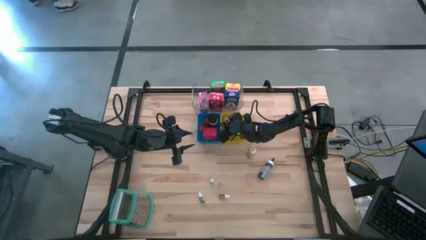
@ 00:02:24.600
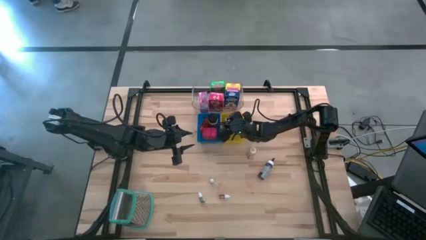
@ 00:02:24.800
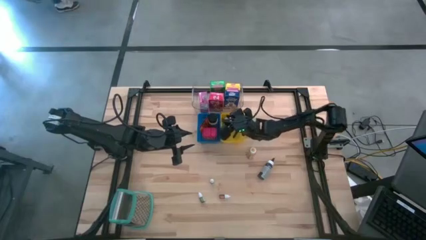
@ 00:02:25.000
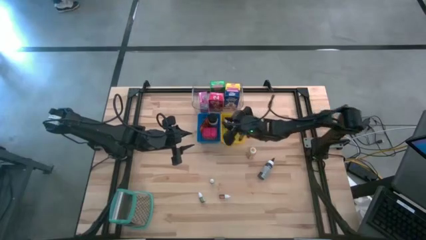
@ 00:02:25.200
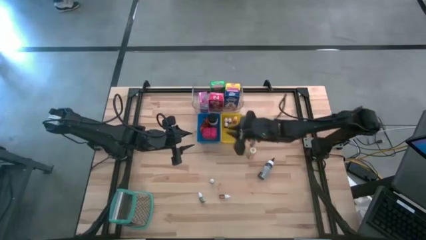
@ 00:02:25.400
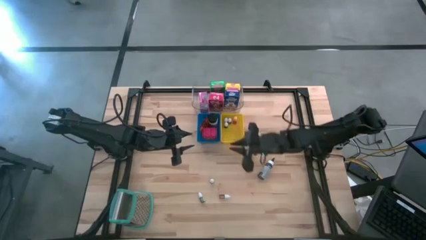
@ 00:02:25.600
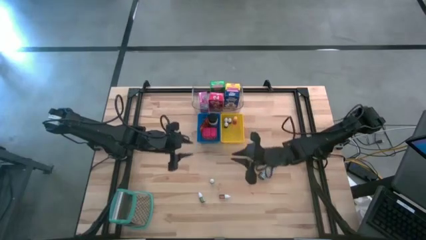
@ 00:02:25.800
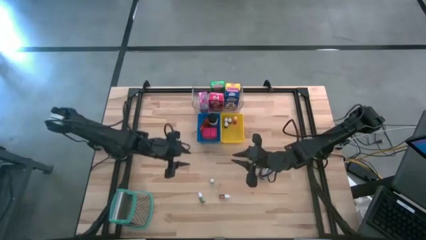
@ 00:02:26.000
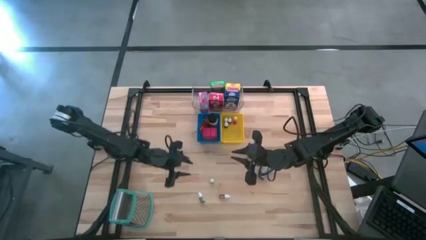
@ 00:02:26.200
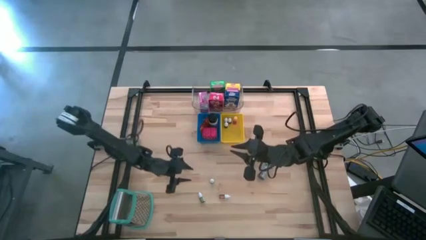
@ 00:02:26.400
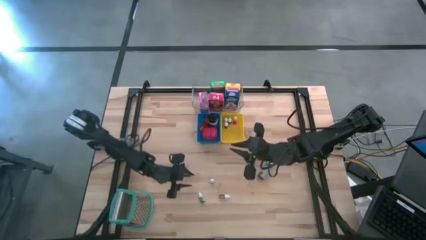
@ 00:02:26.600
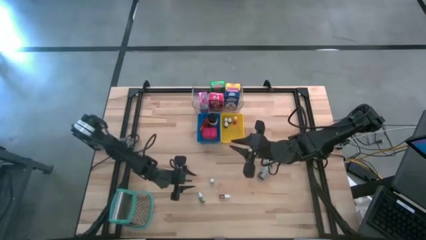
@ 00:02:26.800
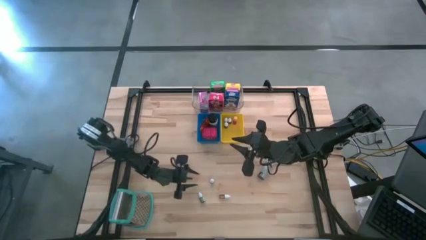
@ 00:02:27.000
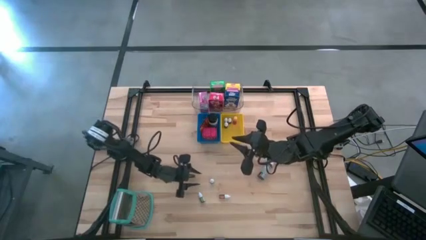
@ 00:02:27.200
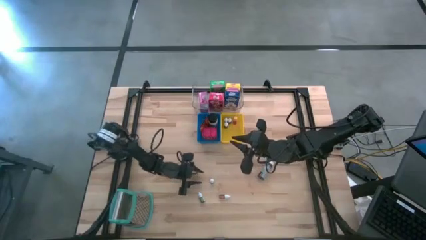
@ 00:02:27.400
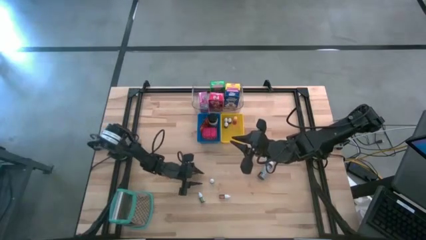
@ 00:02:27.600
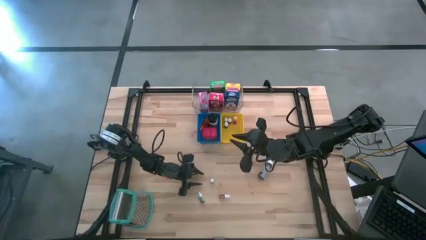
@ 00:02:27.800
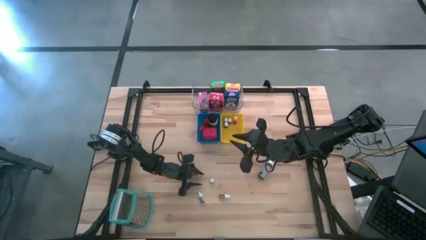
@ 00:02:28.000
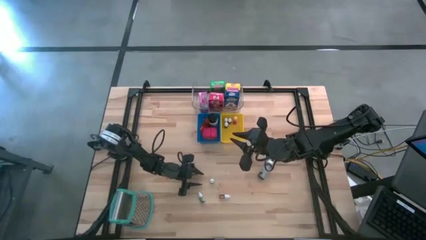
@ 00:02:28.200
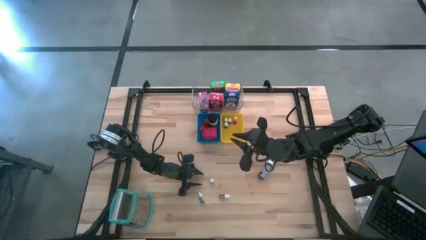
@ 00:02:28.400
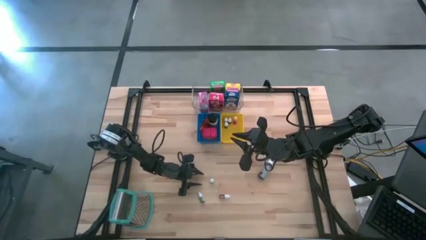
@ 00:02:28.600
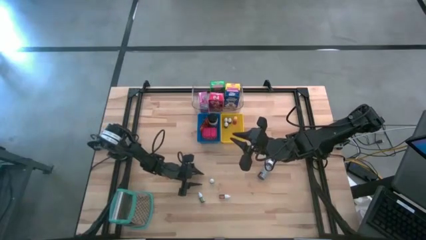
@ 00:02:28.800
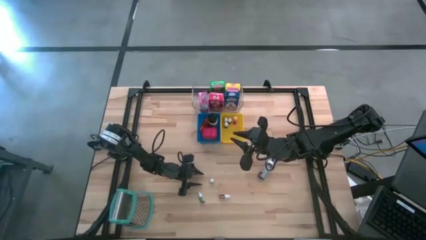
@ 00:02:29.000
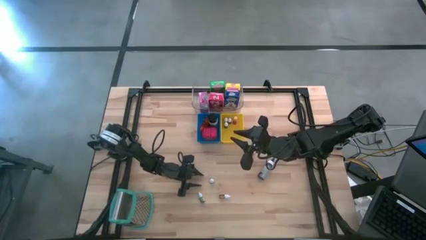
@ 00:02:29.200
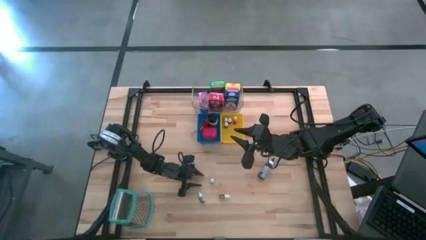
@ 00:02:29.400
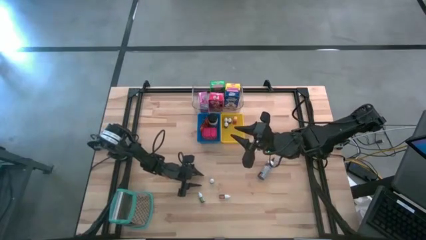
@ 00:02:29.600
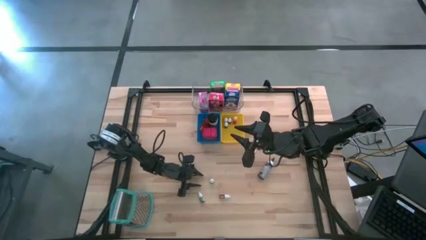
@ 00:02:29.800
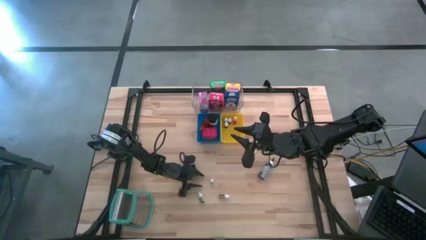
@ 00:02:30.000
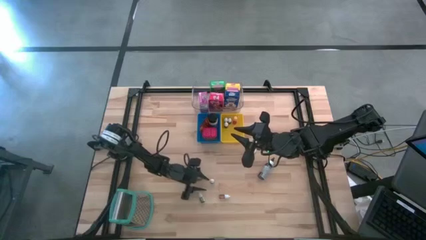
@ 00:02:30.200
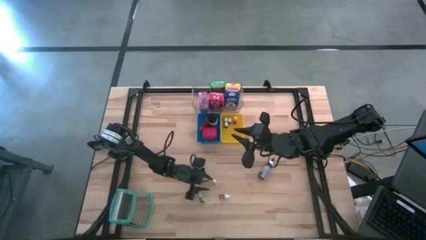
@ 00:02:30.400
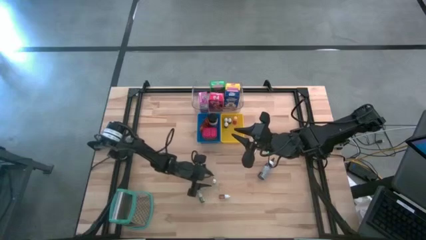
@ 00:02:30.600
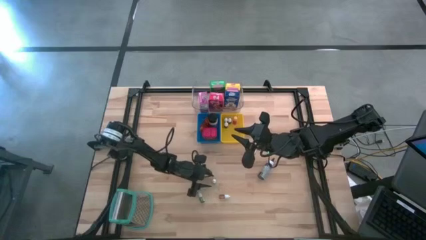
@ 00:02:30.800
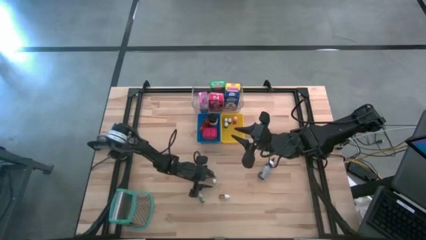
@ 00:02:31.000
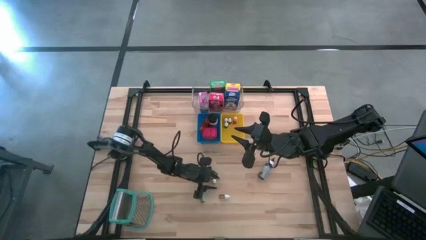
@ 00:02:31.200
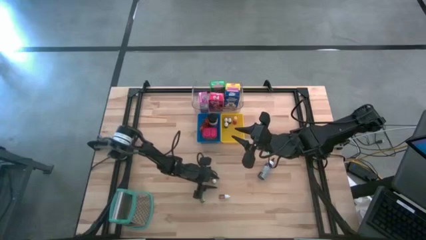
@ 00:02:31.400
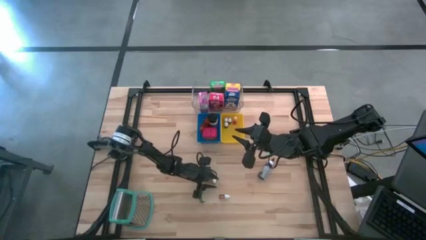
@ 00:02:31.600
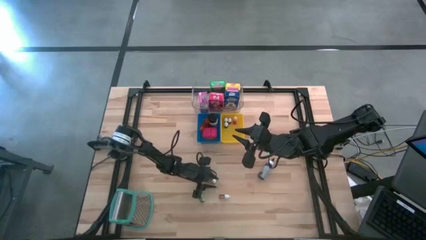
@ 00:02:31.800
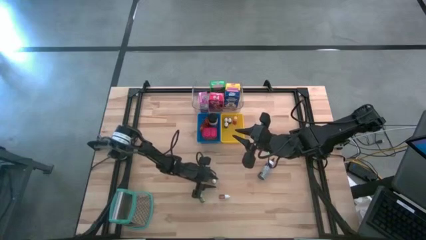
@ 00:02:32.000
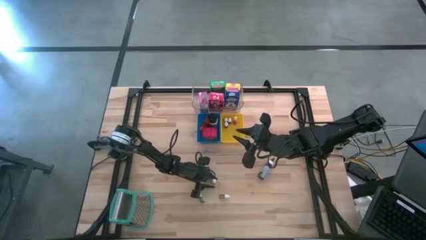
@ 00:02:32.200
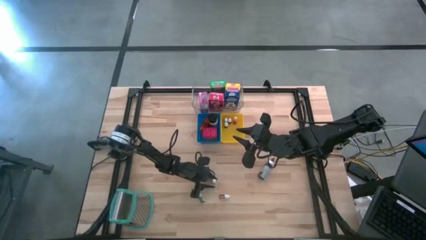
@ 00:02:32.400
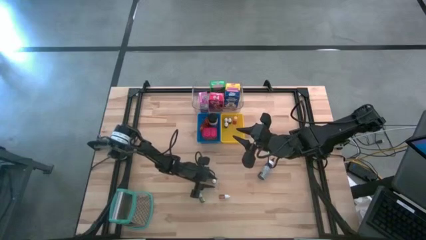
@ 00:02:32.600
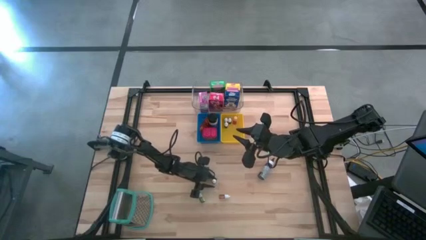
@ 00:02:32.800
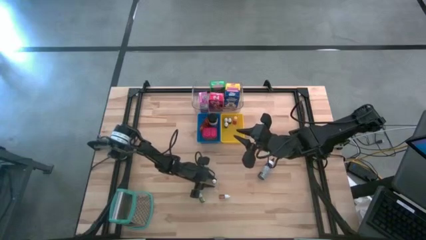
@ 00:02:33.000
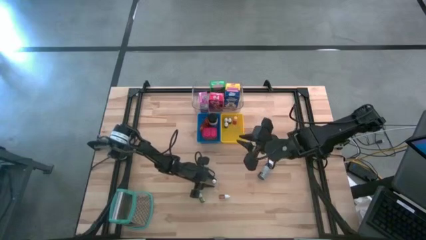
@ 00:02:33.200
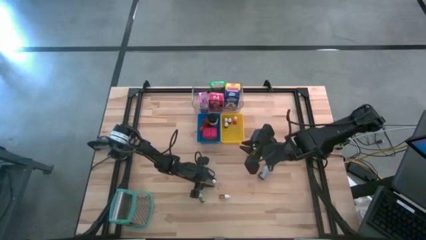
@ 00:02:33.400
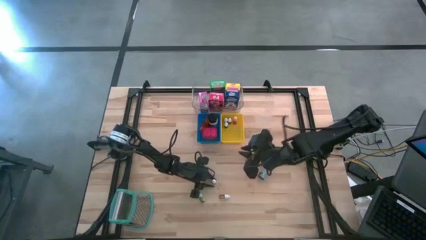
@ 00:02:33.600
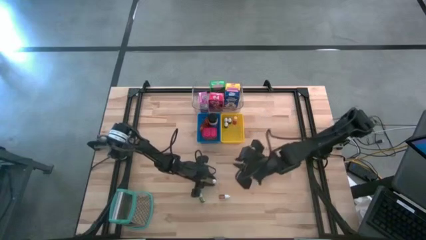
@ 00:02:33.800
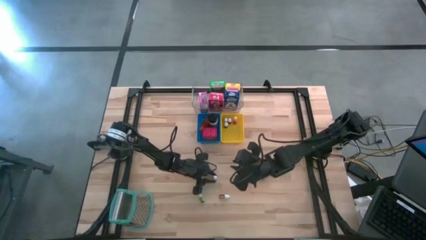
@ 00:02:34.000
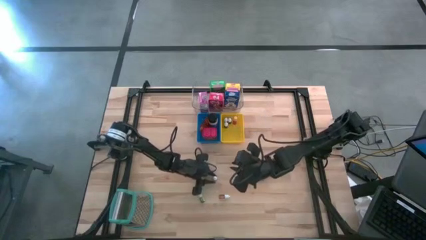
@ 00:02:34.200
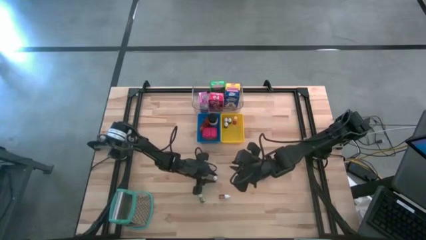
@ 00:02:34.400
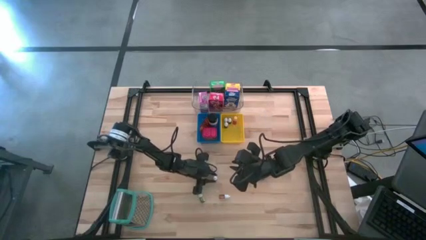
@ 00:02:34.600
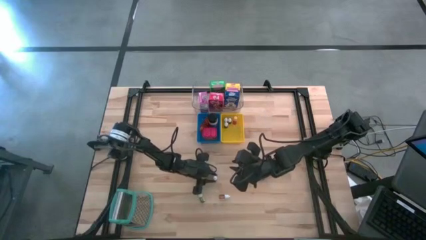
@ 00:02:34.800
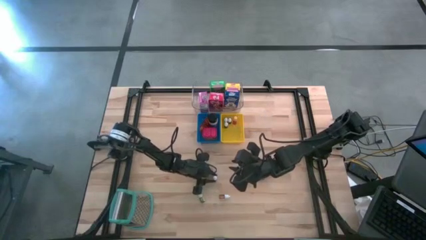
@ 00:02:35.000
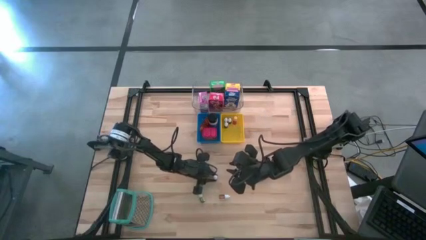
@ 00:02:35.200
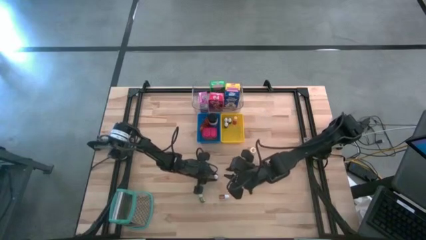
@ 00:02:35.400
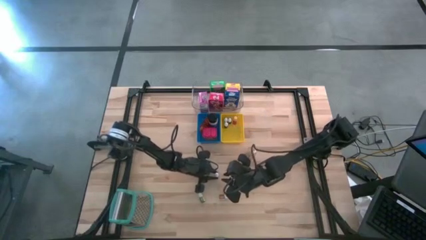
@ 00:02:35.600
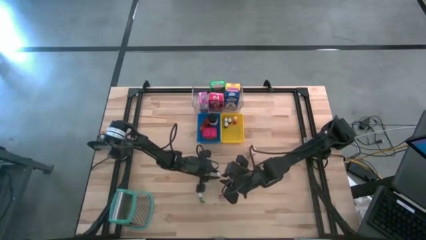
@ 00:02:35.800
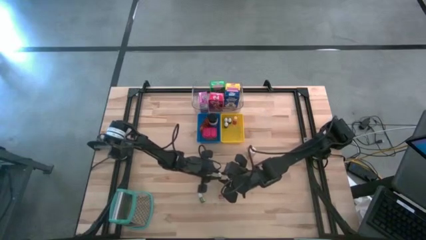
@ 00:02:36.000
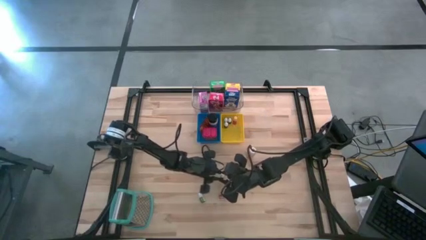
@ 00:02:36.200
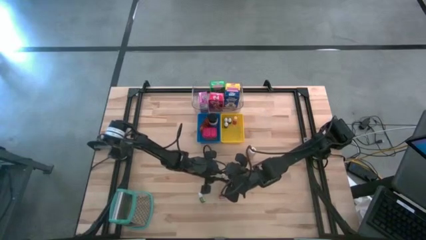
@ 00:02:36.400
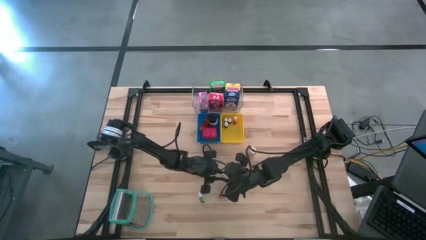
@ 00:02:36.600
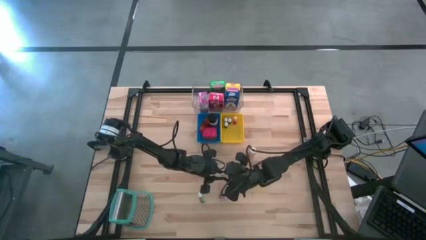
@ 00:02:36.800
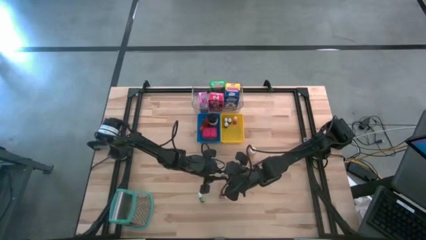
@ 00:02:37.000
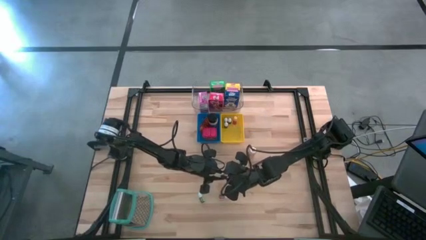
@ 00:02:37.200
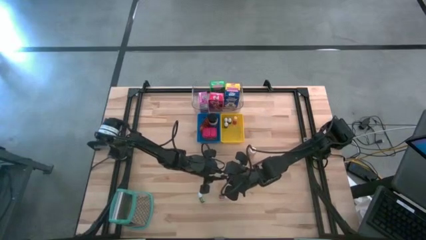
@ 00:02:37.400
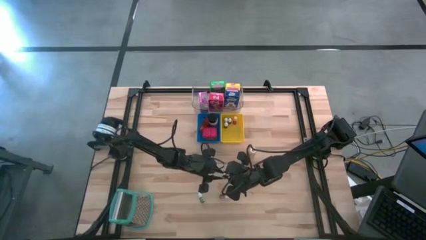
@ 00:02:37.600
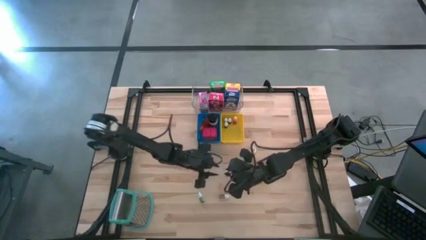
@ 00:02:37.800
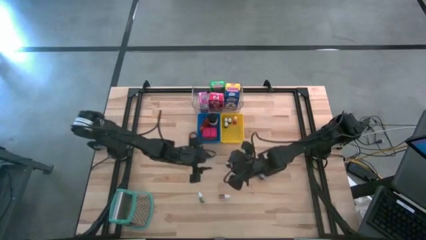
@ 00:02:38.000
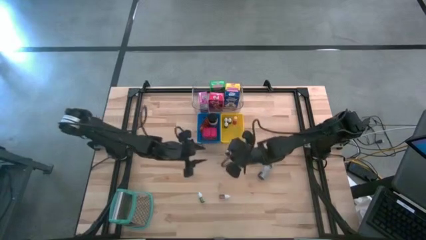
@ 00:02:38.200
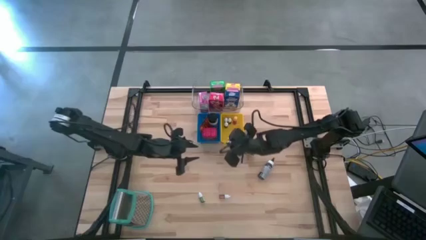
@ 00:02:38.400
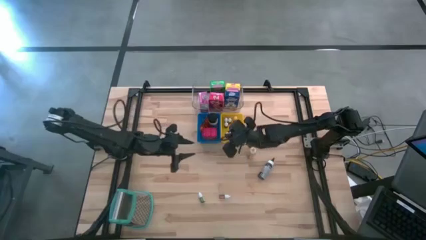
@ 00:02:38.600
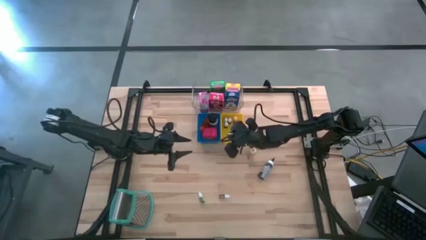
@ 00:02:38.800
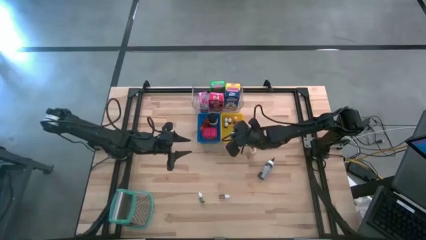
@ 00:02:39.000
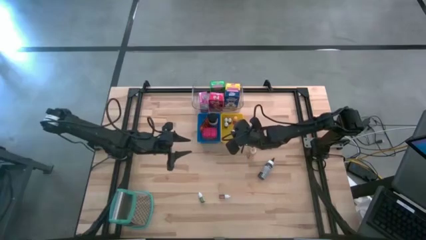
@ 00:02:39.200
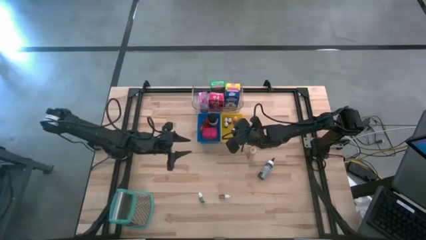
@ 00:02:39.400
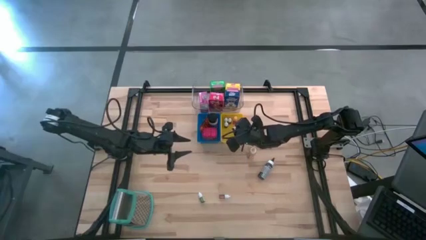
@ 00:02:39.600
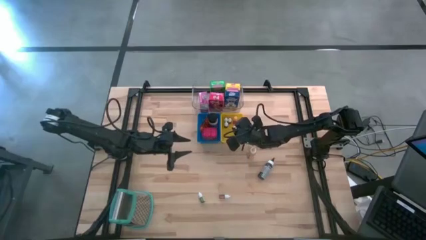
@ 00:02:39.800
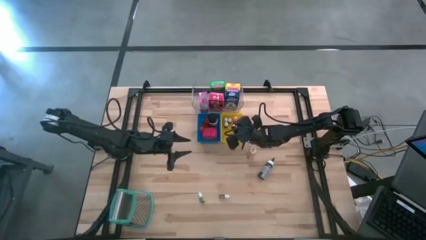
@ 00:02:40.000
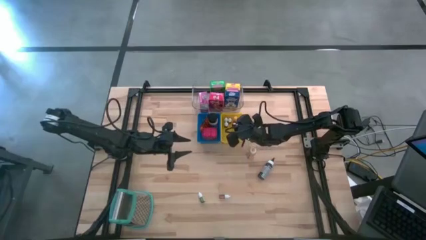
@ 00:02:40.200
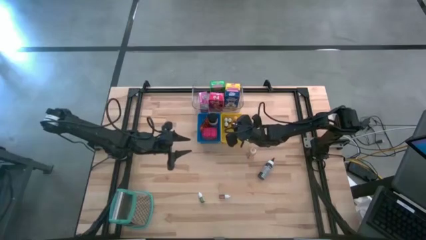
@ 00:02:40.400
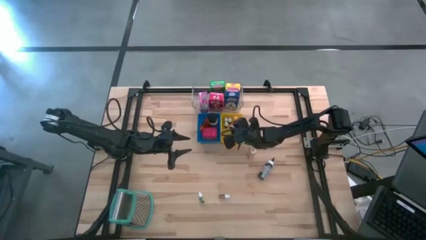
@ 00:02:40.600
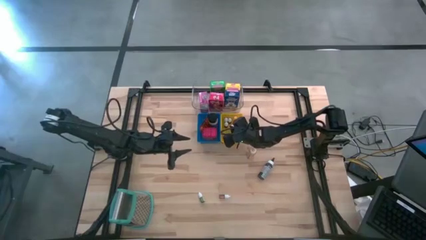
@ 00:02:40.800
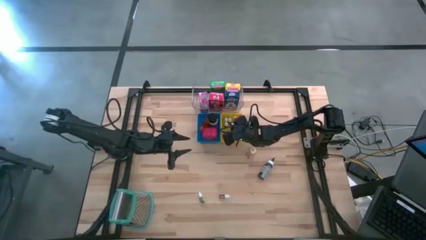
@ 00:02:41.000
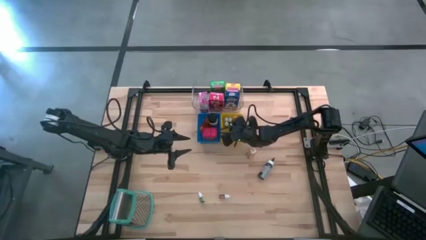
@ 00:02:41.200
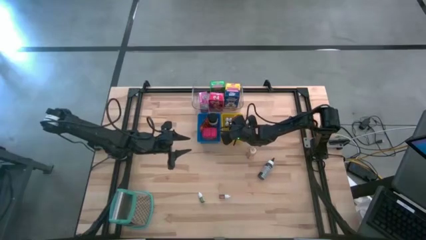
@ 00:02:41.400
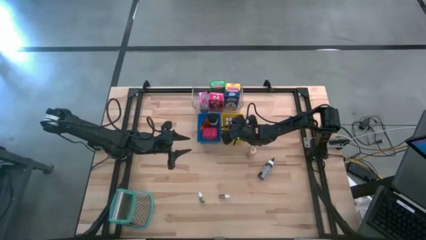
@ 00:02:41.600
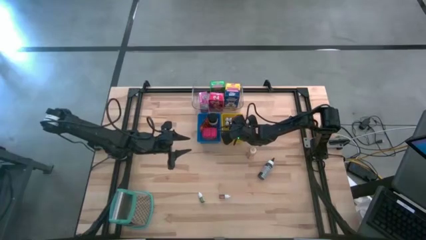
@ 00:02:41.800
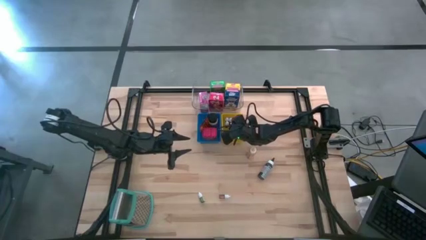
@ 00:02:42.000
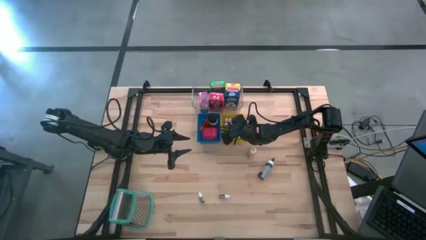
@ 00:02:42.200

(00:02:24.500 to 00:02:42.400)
Task: Pick & Place Kitchen Items
Put the small black food coloring bottle into the yellow bin
